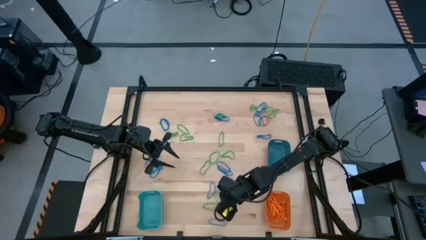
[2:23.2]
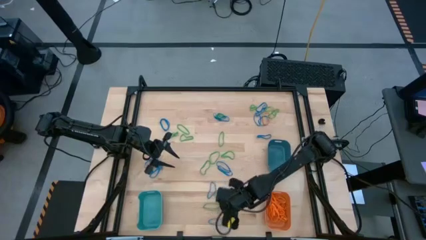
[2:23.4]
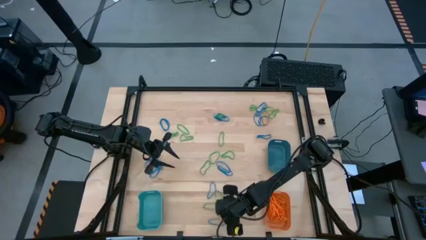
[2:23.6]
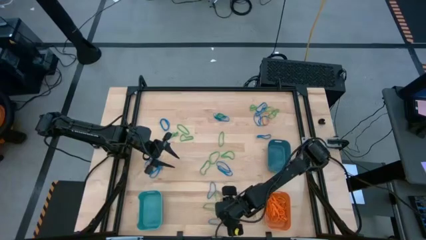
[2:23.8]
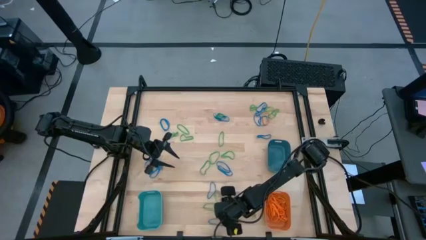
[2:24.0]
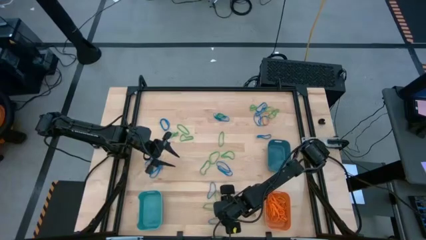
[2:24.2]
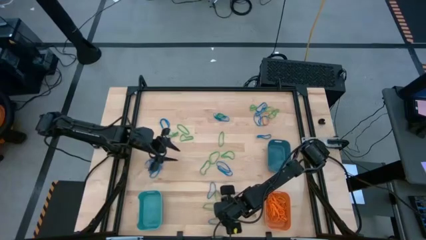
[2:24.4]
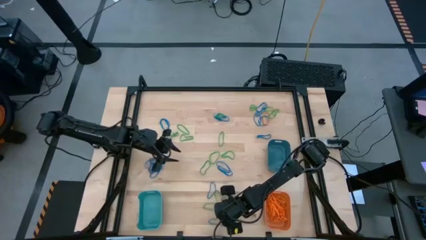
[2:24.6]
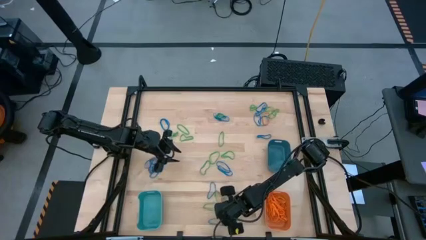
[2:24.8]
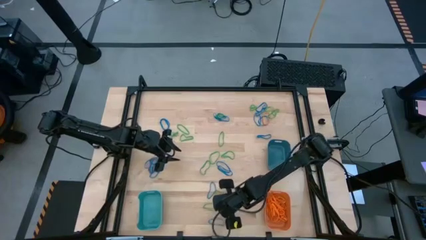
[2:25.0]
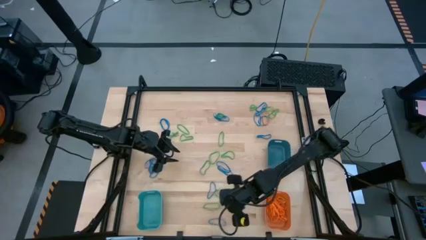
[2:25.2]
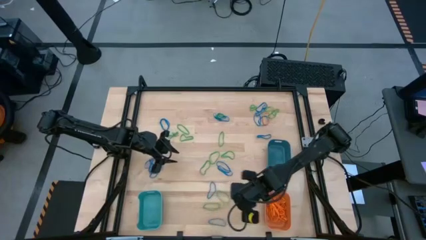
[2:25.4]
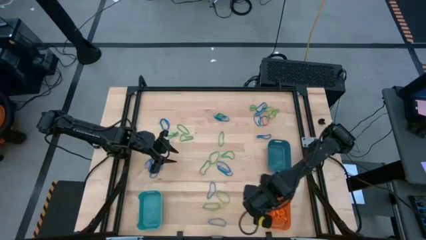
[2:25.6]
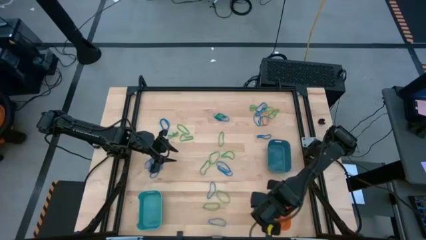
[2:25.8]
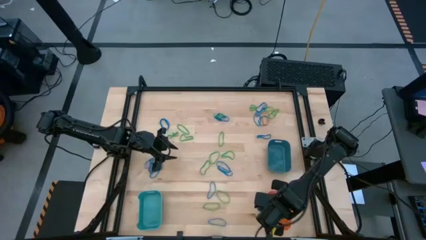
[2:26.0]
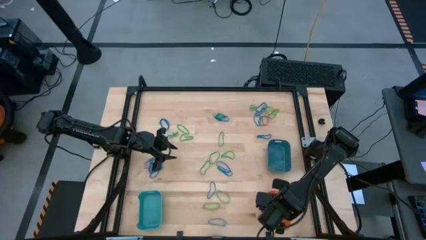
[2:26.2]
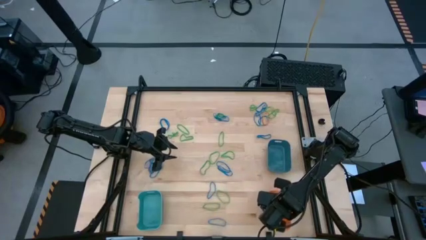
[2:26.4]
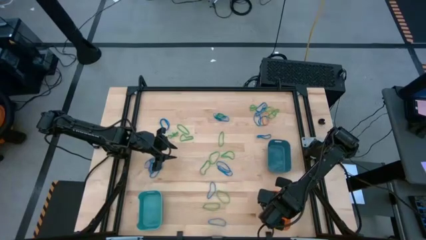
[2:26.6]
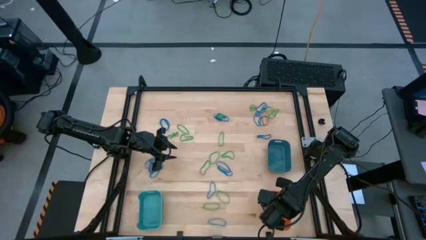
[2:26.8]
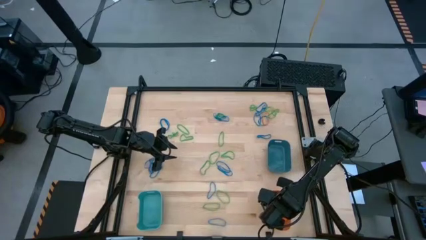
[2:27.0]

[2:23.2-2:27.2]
Task: Sort rubber bands into baskets
Put the orange rubber band into the orange bin

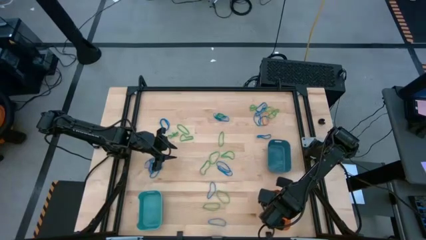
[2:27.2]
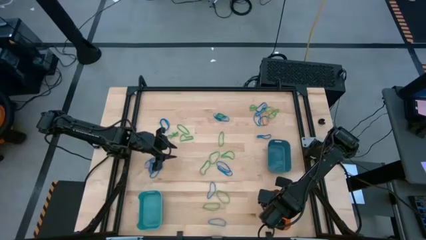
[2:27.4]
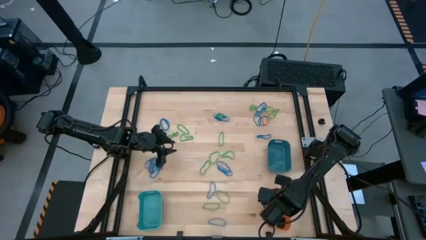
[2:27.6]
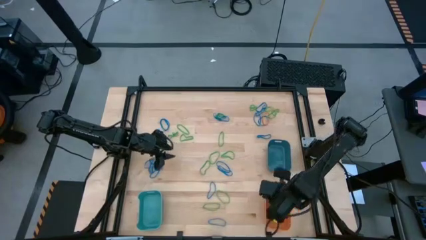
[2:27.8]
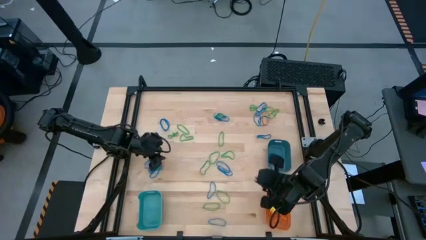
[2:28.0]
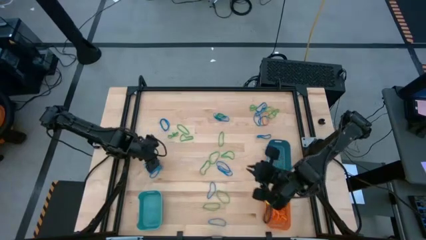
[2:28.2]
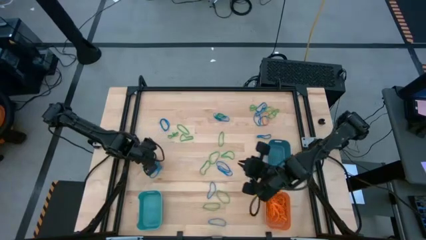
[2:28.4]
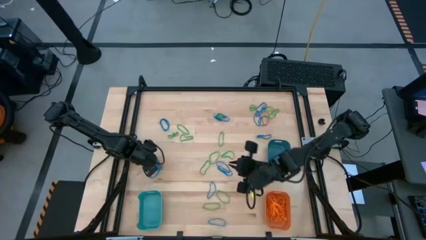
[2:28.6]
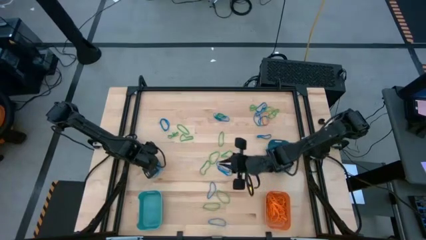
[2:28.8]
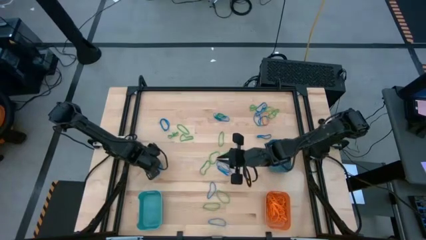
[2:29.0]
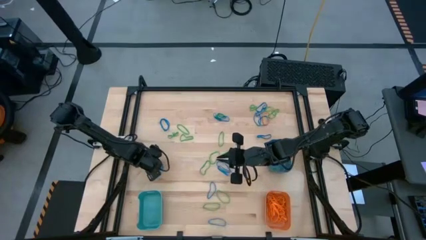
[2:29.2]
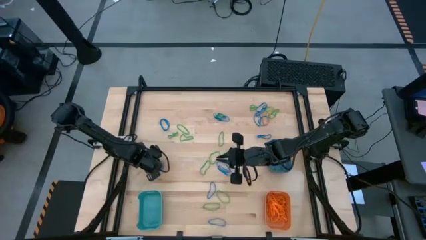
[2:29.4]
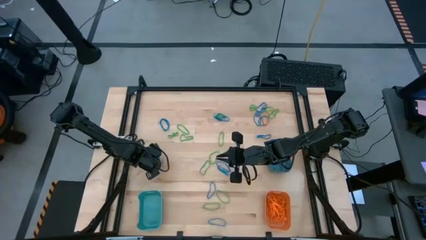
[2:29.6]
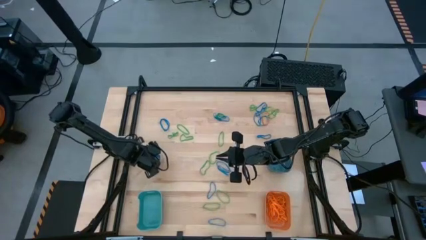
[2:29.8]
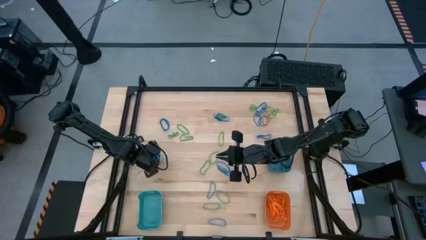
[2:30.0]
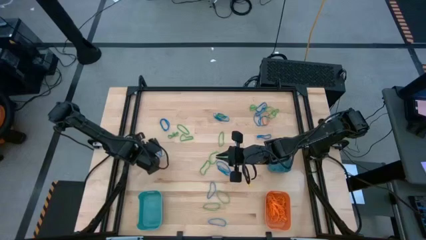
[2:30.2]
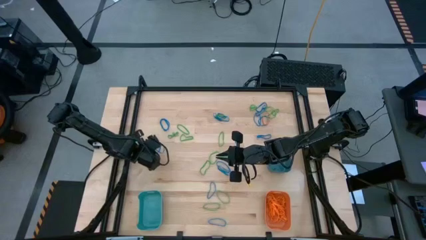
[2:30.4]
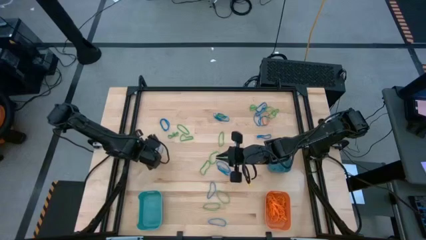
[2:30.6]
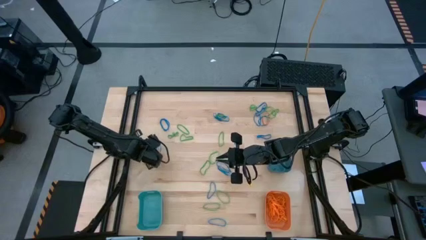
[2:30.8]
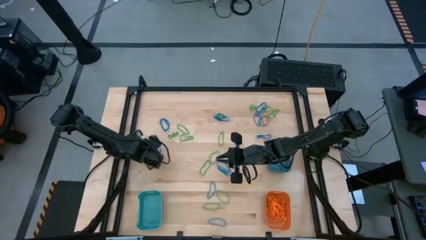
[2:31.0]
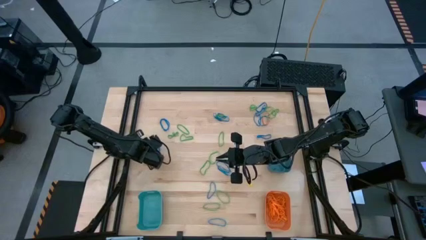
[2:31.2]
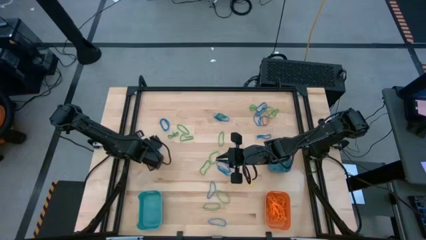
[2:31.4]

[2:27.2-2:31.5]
Adjust the blue rubber bands

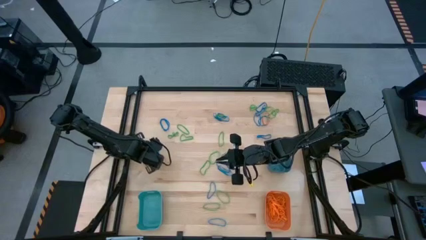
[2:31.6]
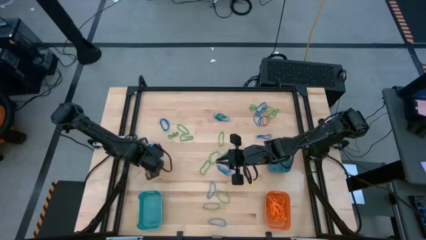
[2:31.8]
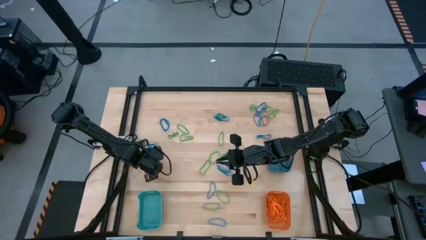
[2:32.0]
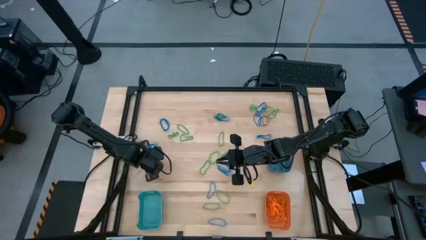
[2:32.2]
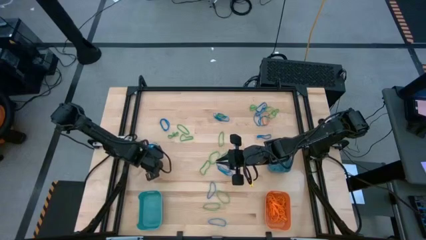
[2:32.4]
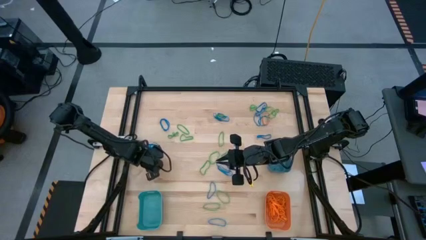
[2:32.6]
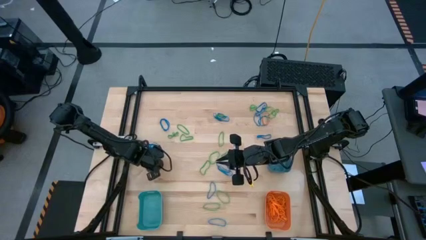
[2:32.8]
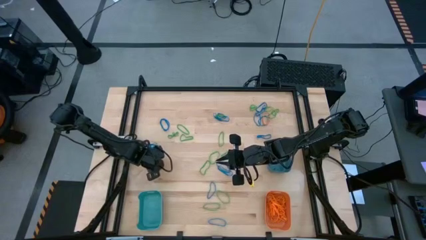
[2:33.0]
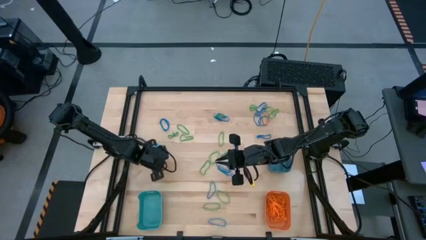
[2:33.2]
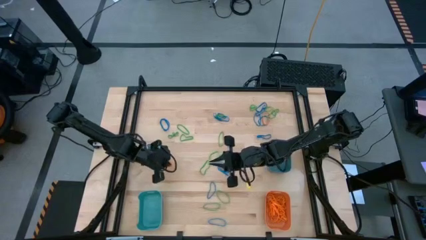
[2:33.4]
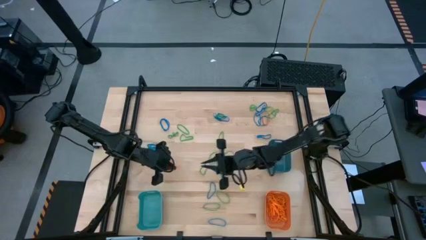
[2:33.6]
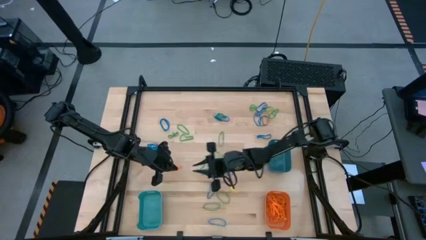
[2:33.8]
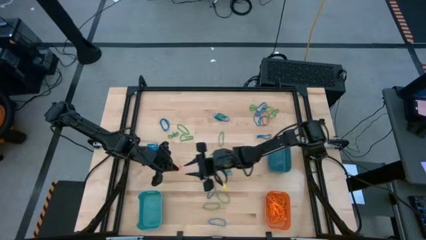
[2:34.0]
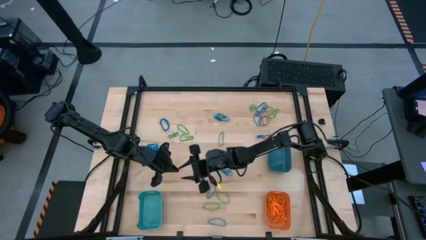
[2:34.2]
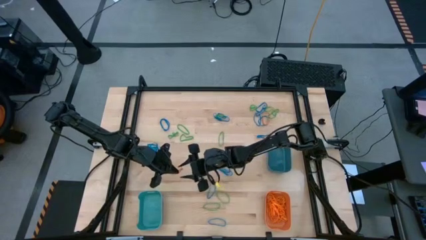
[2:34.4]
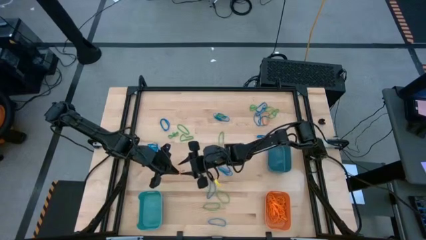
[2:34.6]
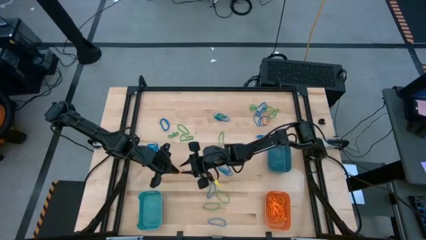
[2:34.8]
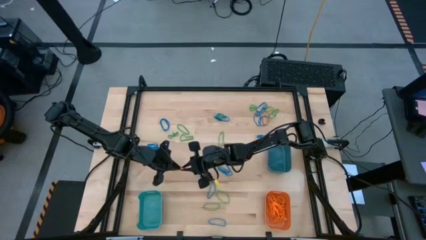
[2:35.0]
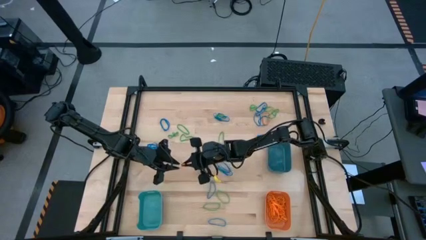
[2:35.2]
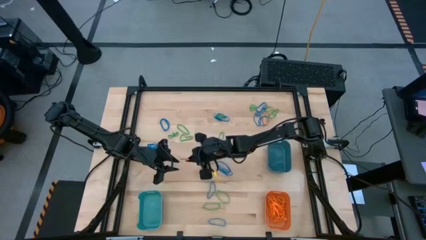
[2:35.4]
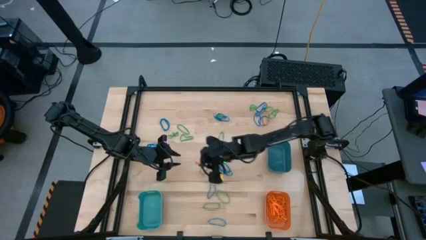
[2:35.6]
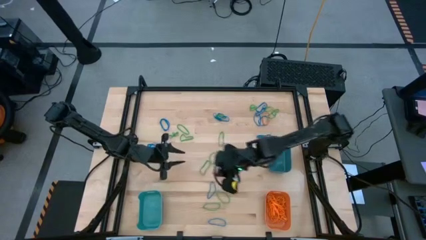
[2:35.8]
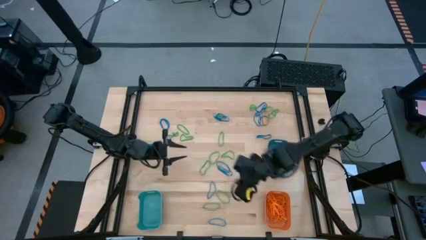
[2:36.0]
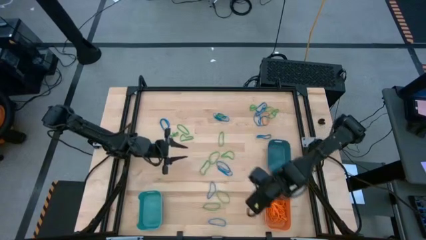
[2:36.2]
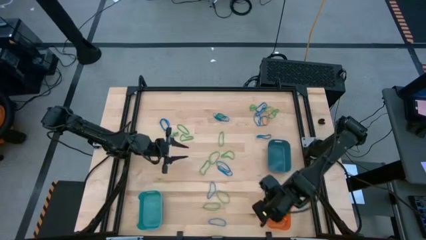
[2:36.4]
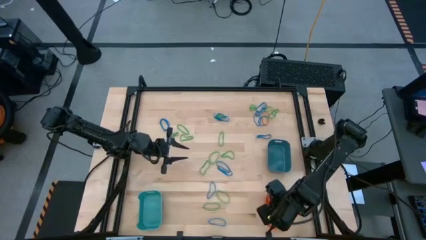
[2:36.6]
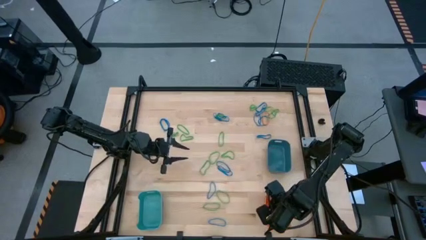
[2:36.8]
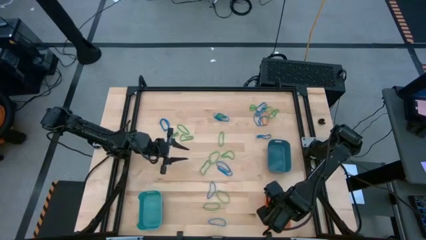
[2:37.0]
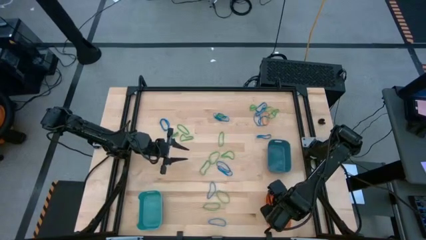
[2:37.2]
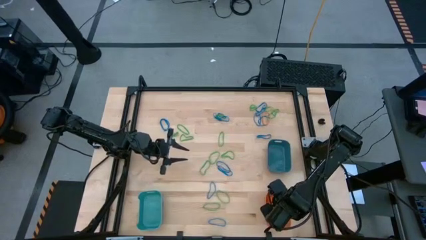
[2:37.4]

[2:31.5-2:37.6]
Put the orange rubber band into the orange bin

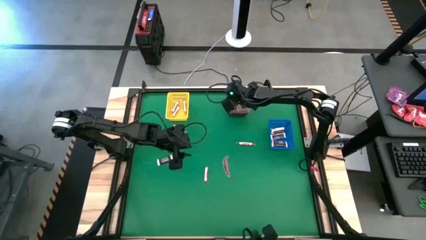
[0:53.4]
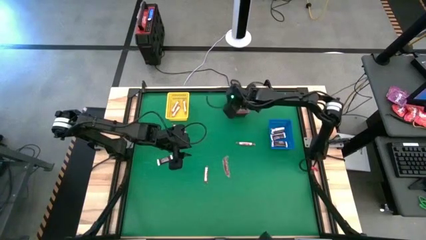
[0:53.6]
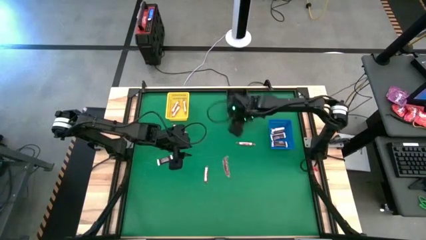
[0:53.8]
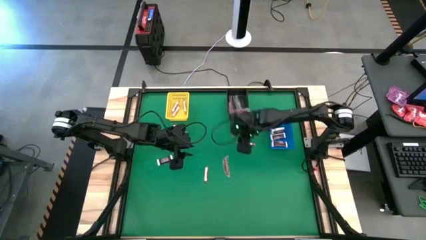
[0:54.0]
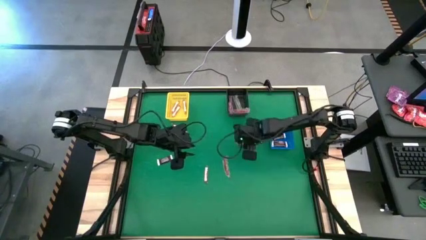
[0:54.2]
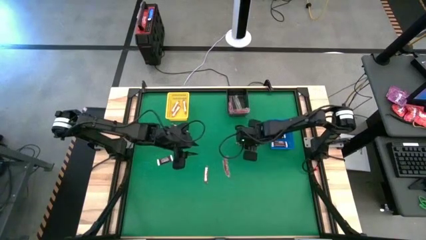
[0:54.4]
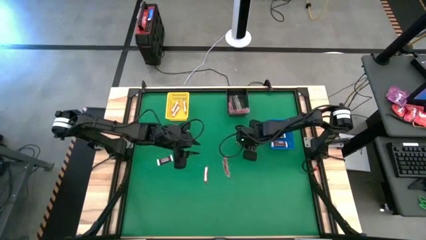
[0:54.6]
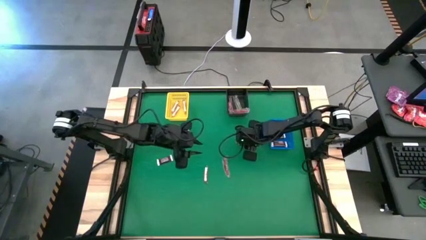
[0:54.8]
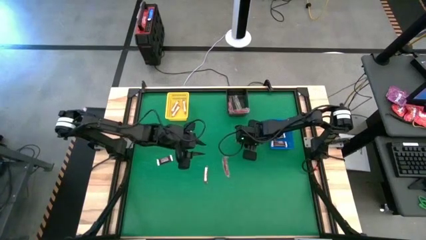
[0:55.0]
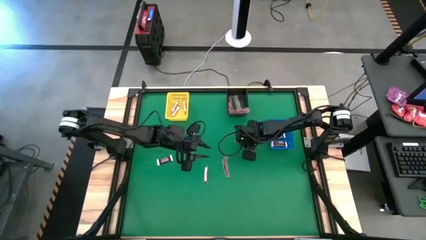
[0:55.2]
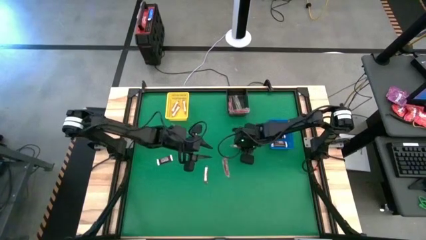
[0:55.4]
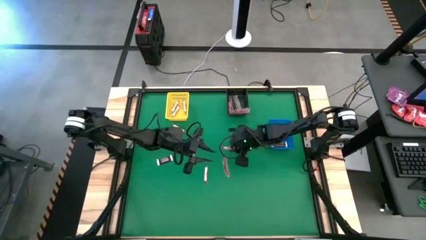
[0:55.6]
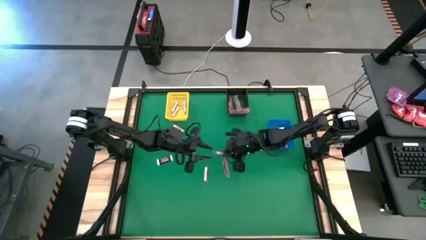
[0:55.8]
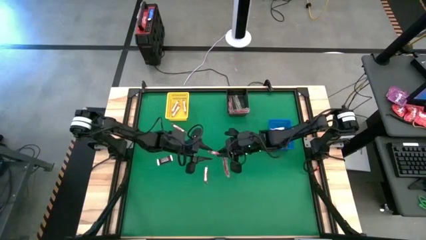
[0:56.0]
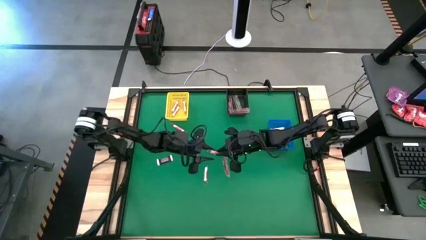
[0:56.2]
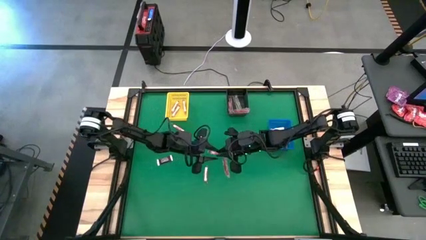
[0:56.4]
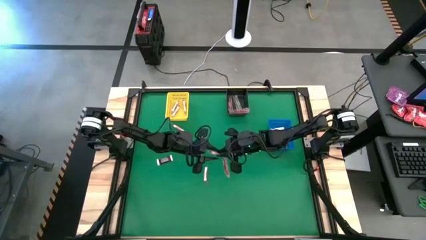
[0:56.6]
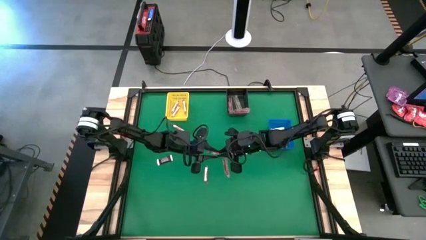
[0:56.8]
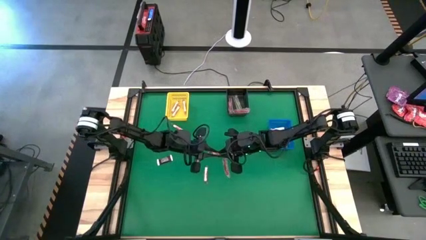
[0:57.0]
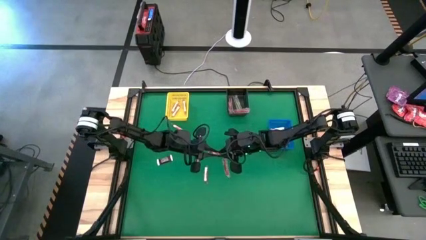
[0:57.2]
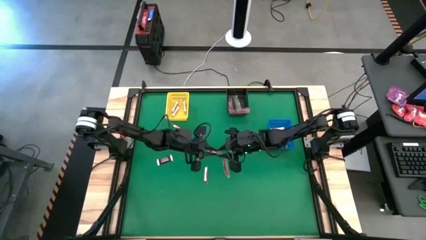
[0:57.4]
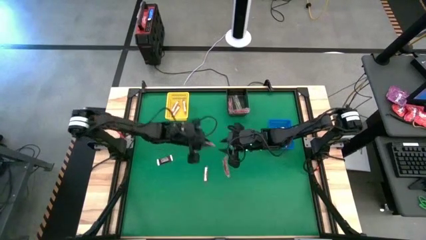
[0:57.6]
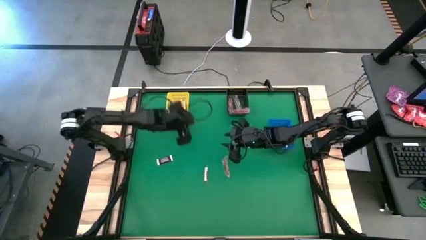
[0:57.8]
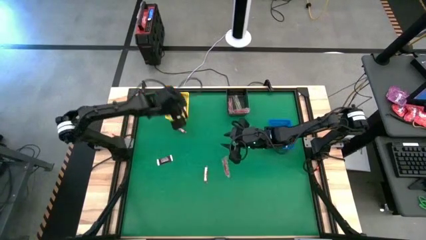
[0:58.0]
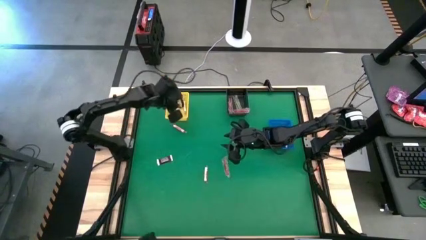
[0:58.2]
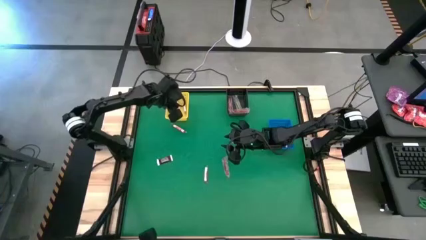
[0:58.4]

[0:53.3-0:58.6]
Task: Sort candy by brand, put in halloween buckets
Put the pink candy into the yellow basket
